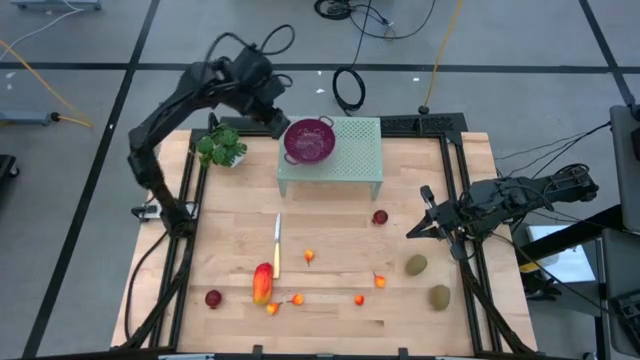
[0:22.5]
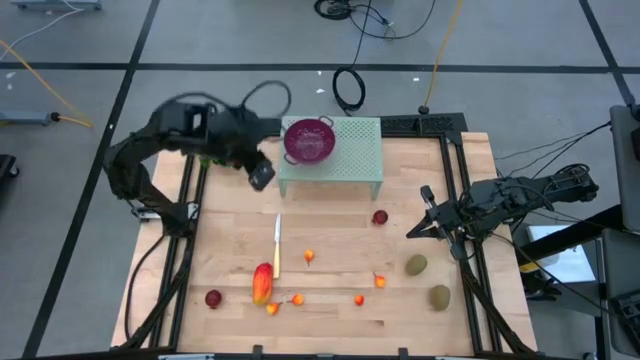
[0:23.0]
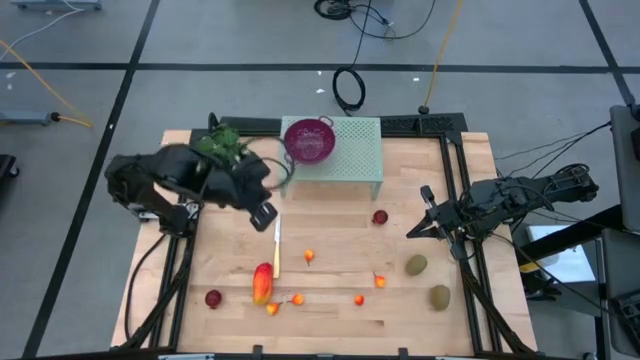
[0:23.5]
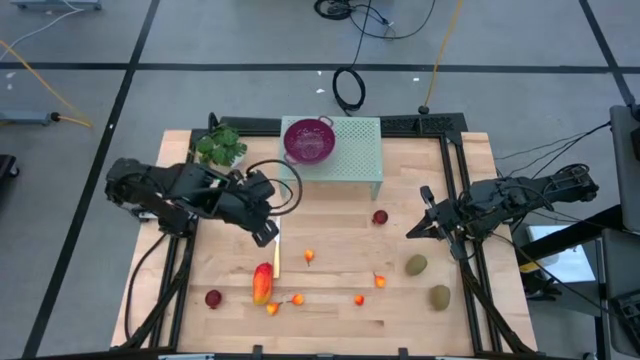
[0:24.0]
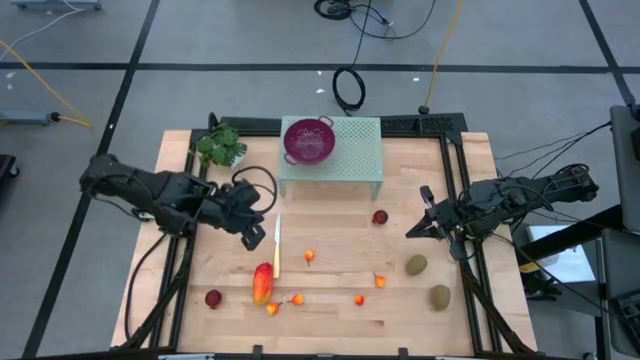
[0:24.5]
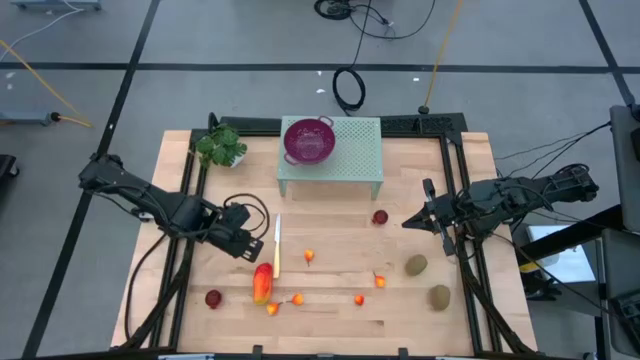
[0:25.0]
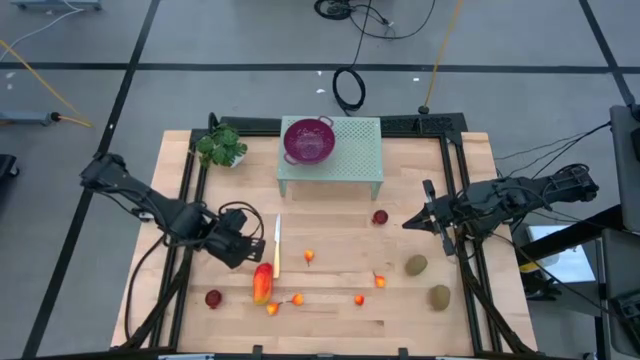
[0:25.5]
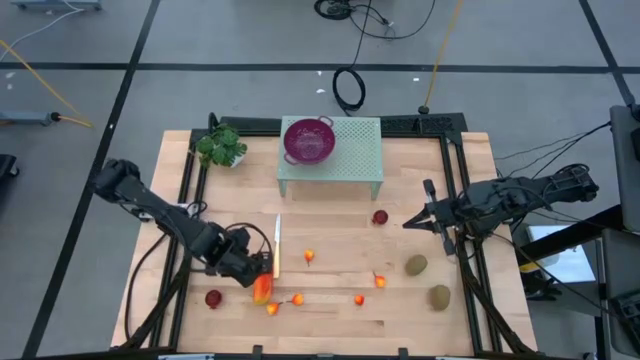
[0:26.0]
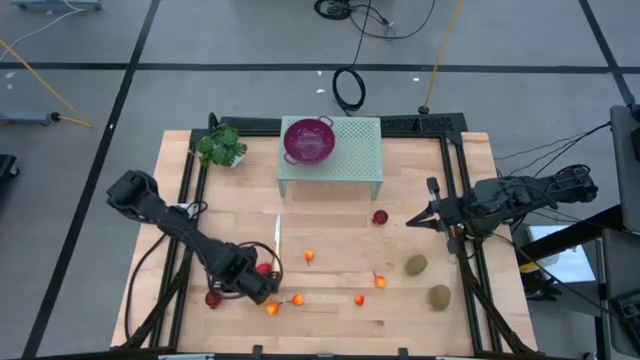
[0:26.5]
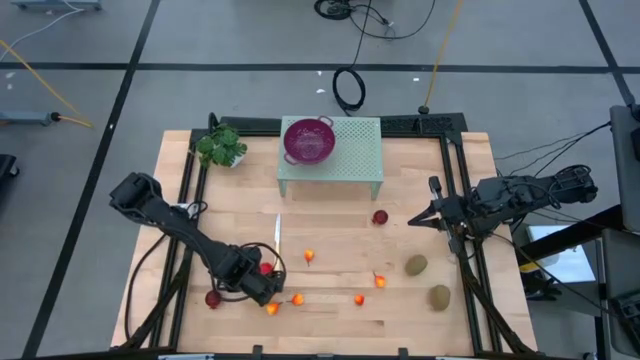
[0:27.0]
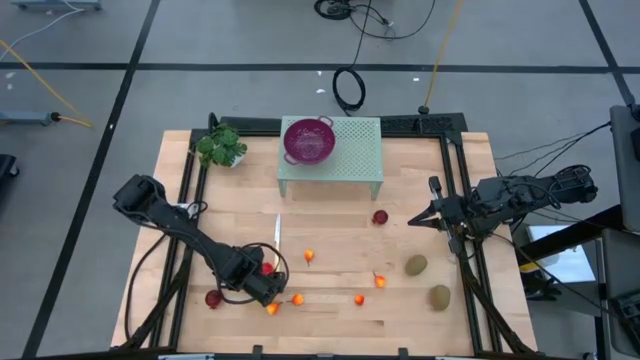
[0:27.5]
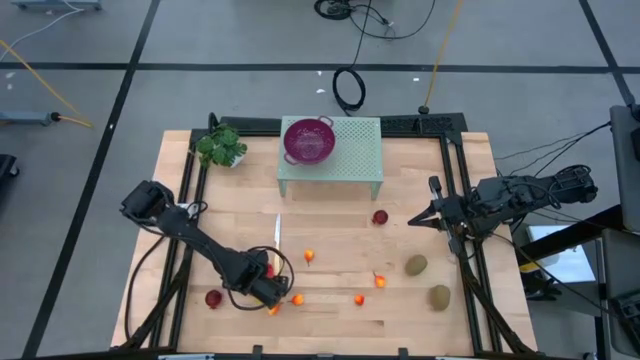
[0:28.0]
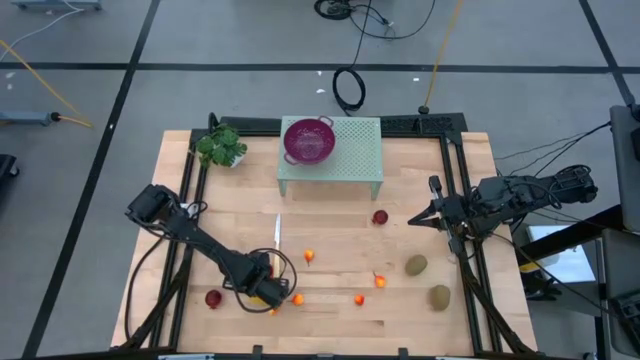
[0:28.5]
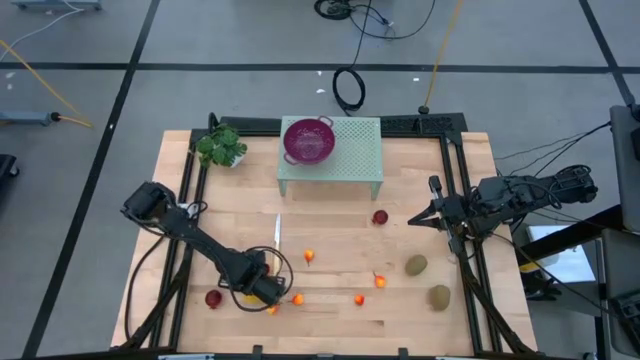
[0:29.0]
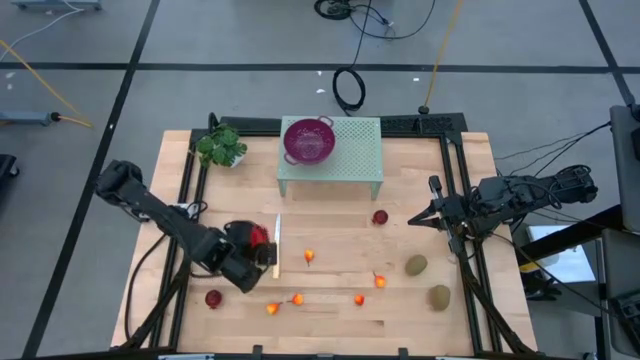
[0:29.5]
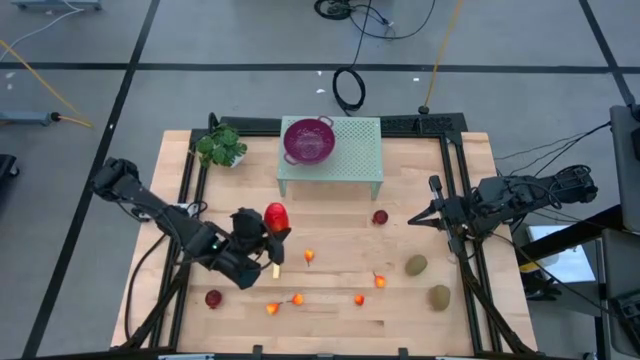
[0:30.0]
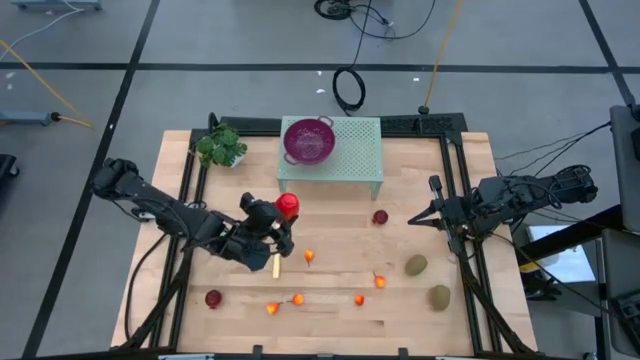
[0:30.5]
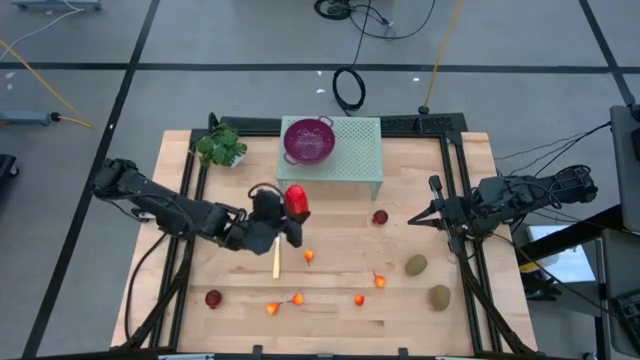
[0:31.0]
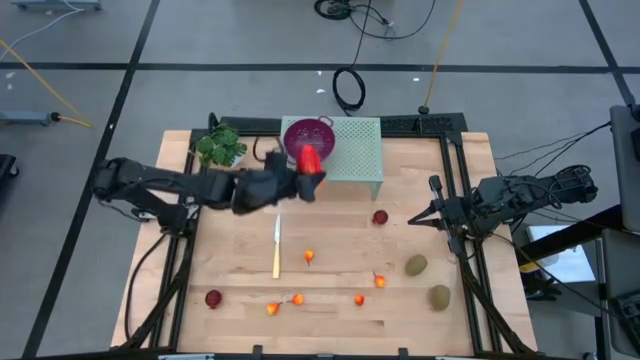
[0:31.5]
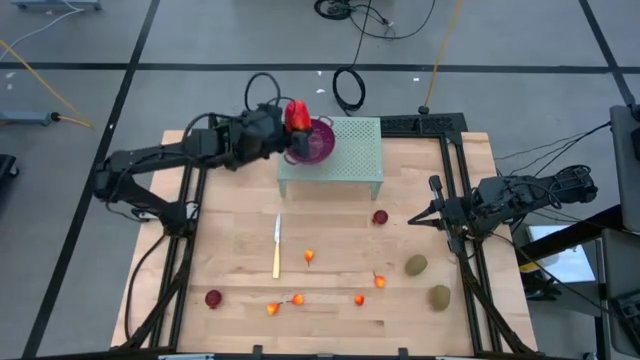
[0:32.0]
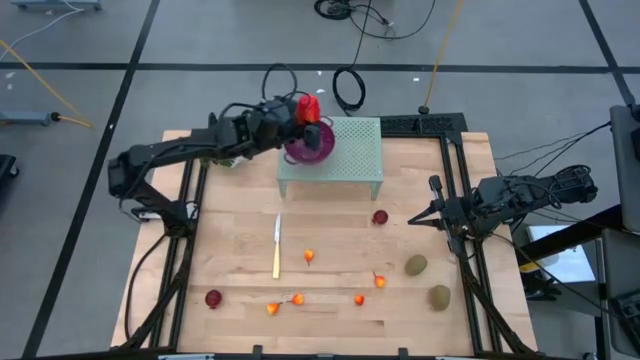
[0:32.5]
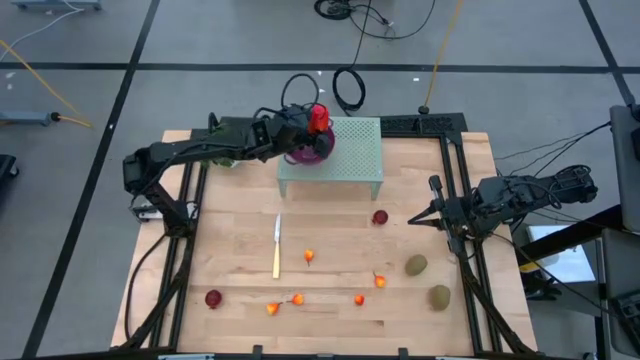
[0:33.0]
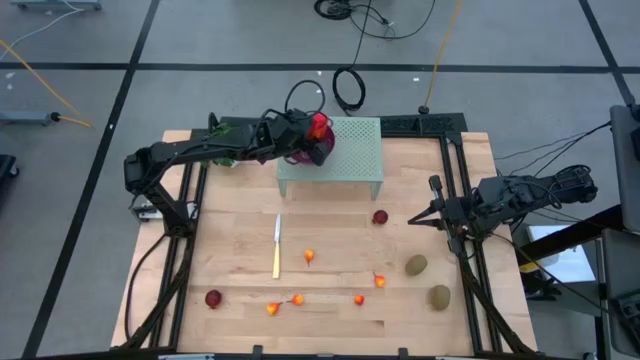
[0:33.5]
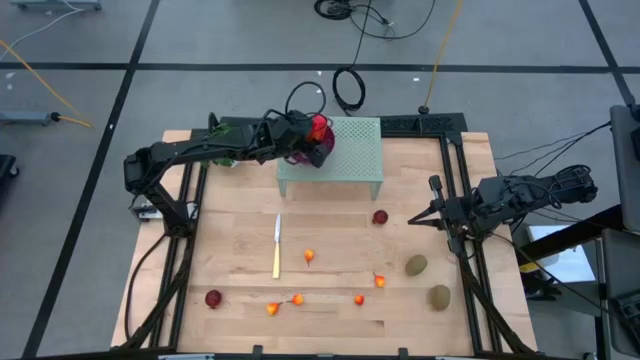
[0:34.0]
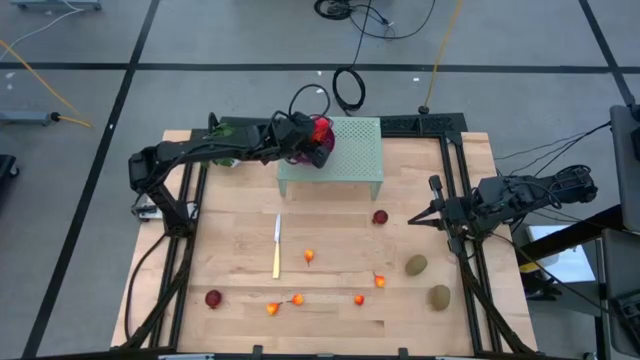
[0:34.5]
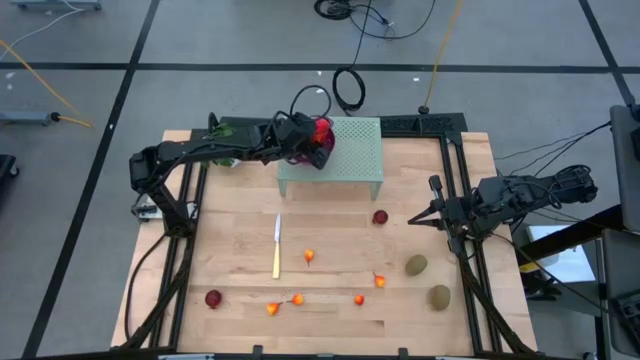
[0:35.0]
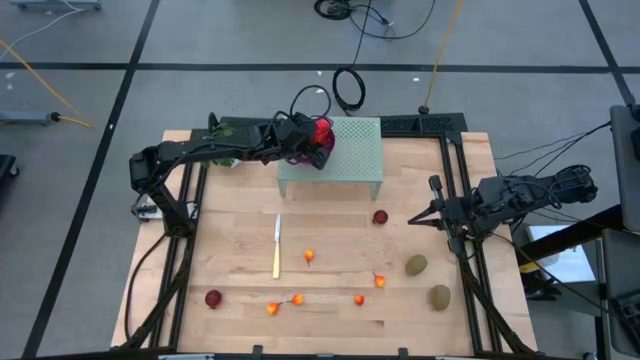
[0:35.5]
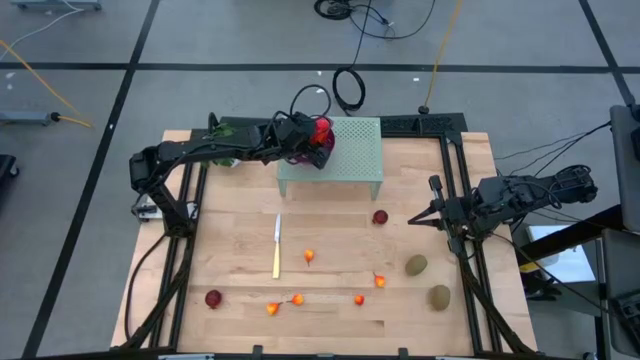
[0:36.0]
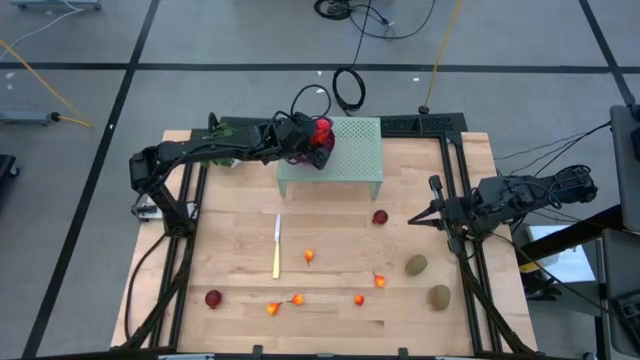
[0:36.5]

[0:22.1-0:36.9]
Task: Pick & Place Fruit
Put the mango into the strainer bowl on the shelf
